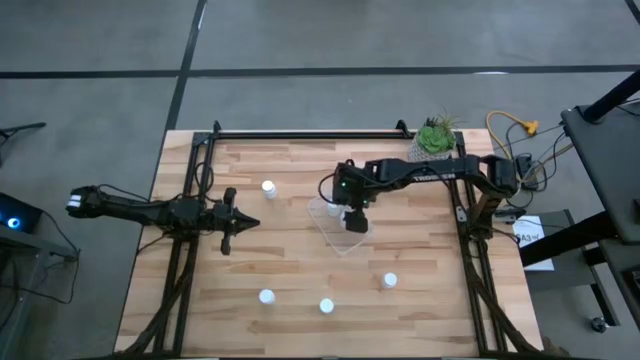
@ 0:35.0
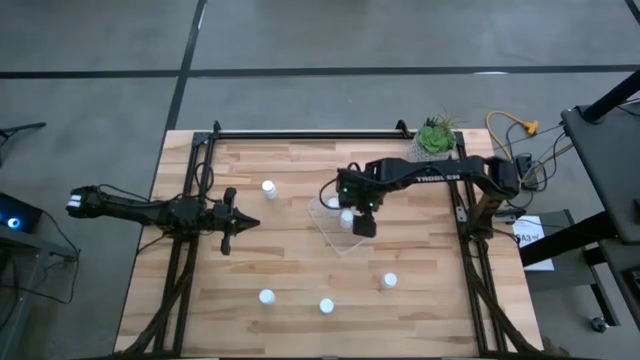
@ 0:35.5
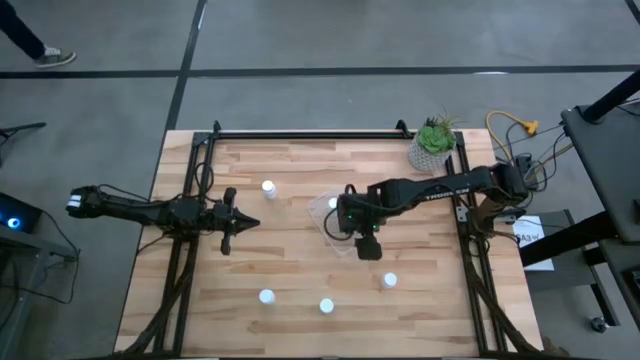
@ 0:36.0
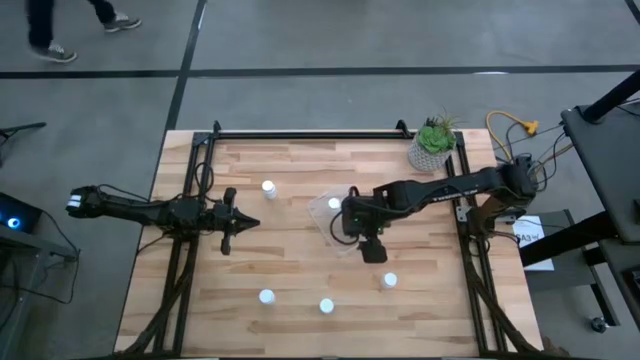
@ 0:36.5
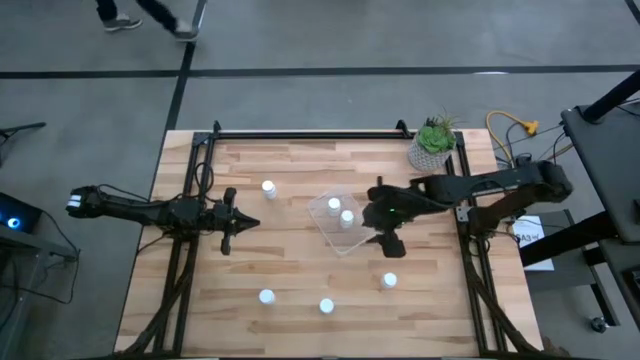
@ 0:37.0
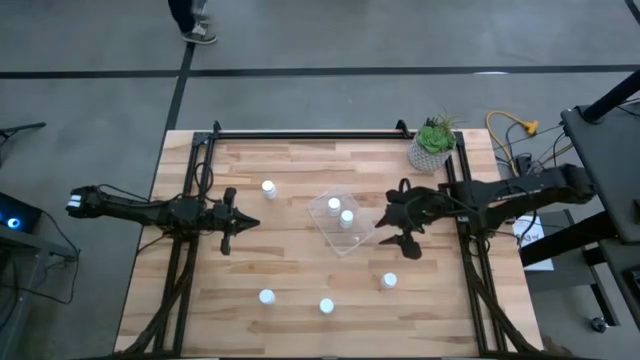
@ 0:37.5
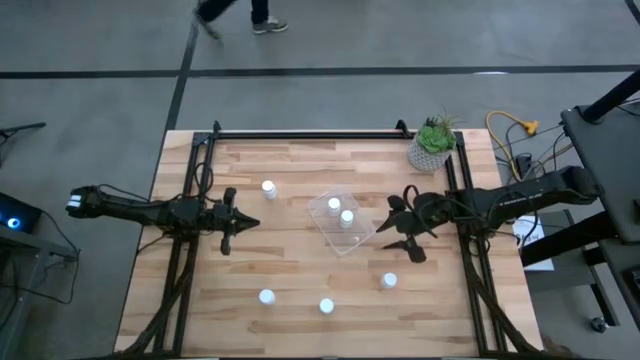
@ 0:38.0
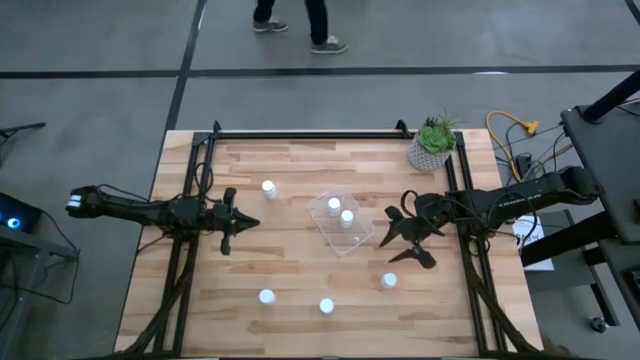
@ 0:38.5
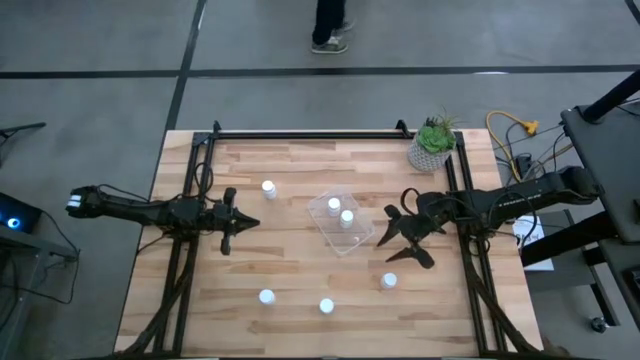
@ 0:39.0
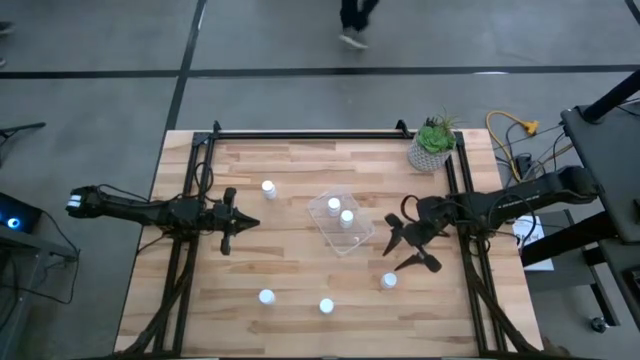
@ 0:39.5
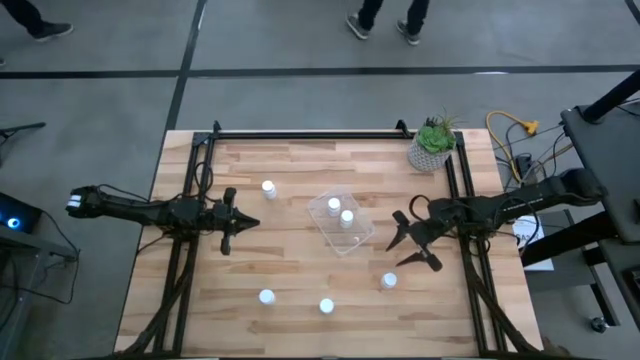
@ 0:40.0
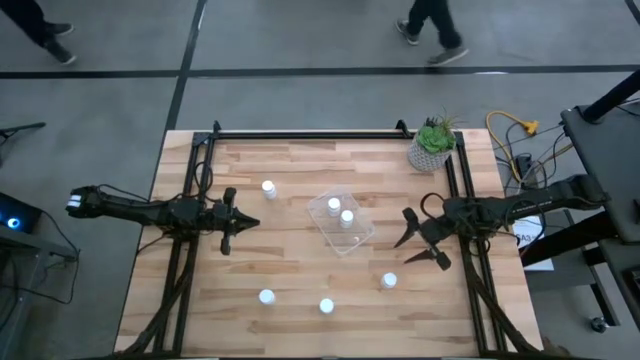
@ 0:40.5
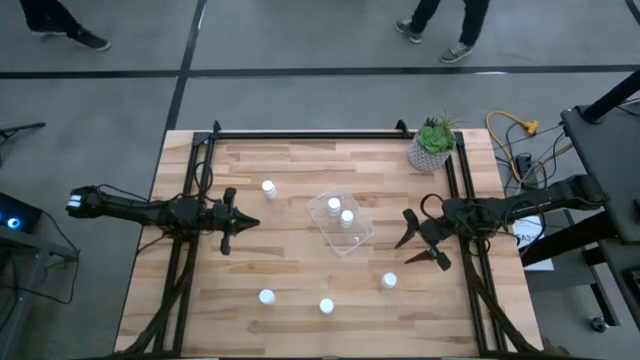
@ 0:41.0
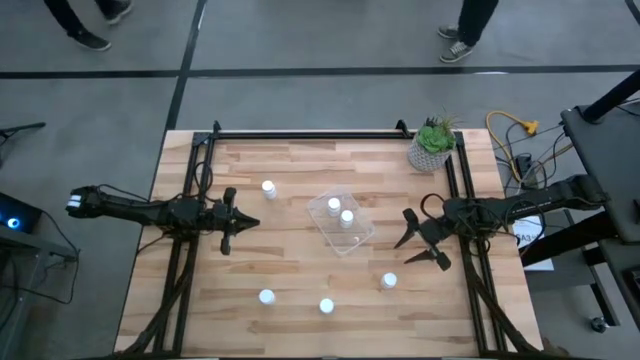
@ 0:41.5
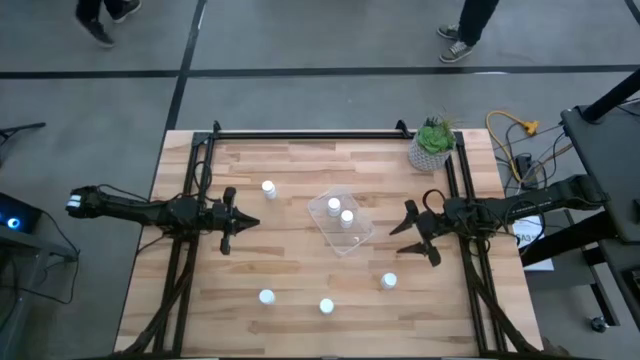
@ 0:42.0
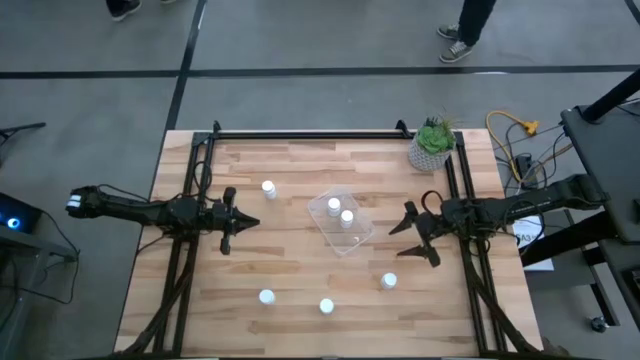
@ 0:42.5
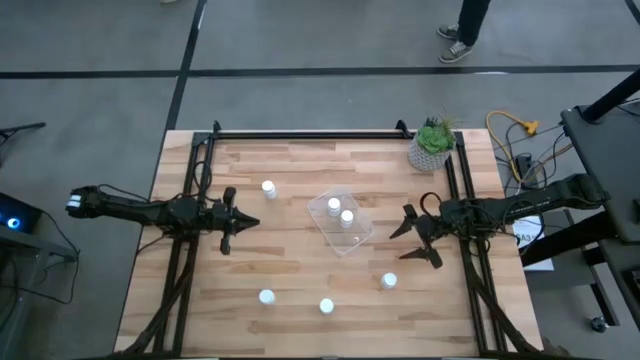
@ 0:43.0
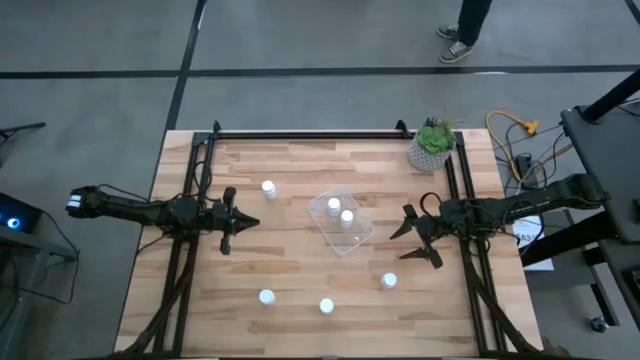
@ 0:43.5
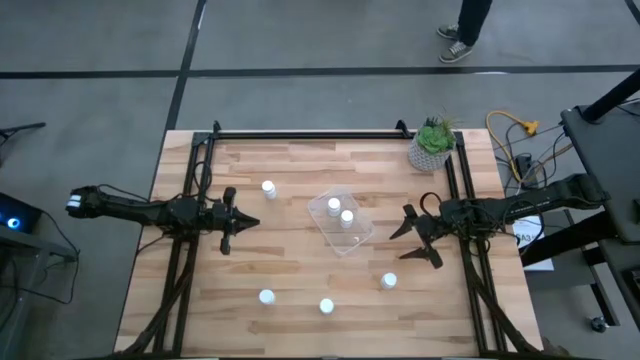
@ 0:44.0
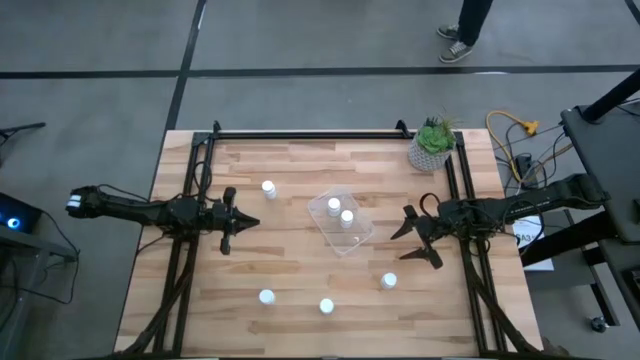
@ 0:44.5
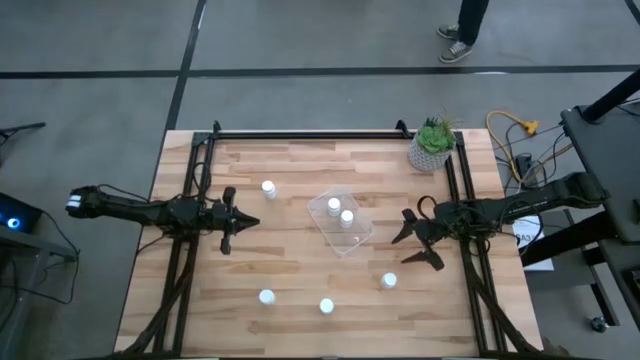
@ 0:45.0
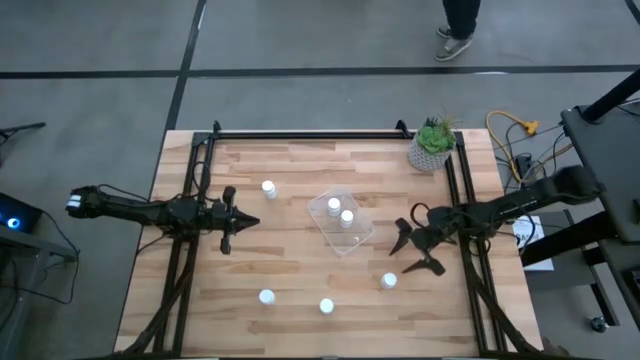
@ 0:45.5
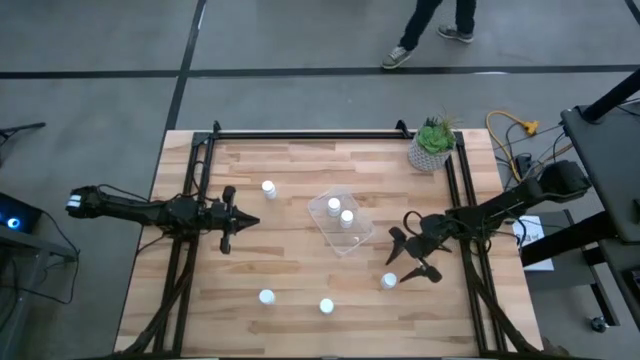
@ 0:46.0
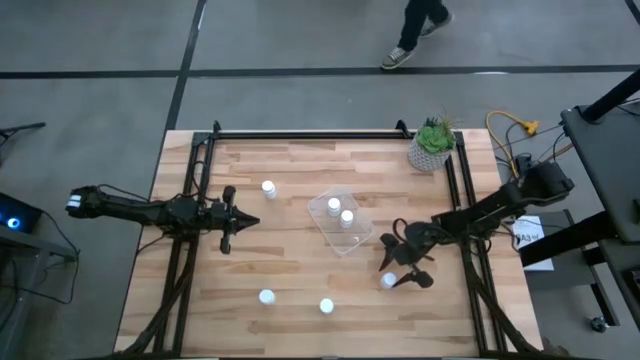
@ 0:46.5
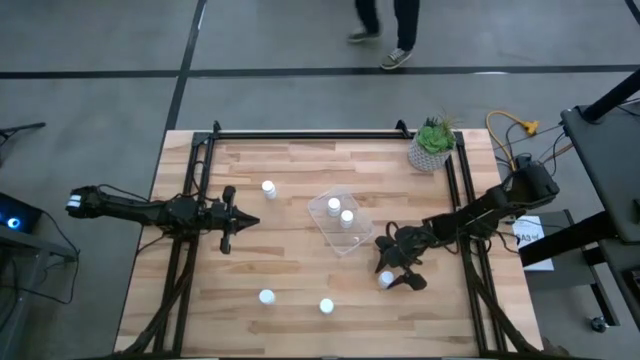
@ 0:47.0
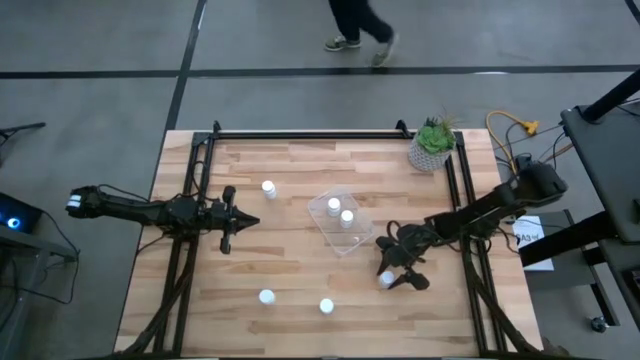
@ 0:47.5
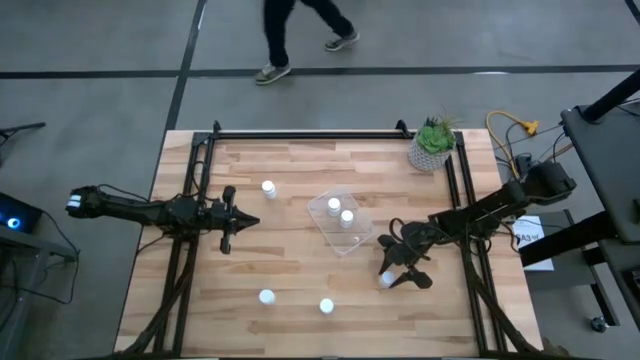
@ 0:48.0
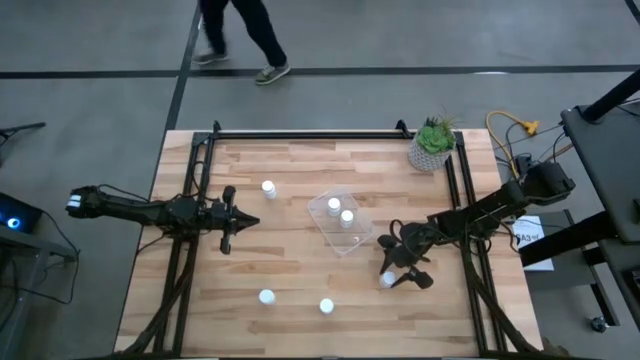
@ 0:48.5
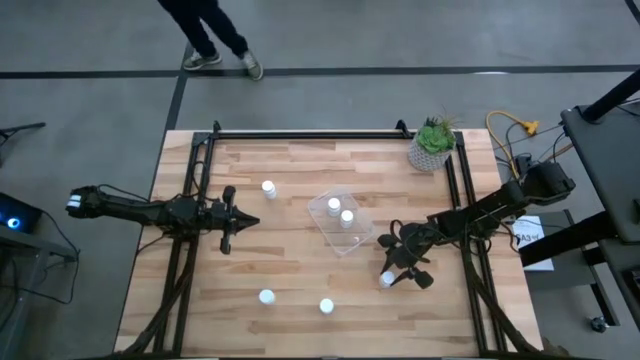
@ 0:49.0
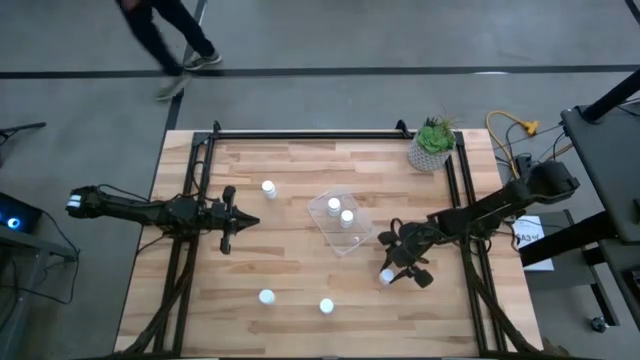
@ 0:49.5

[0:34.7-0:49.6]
Task: Pick and place pill bottles into a basket
Put the white pill bottle into the transparent bin

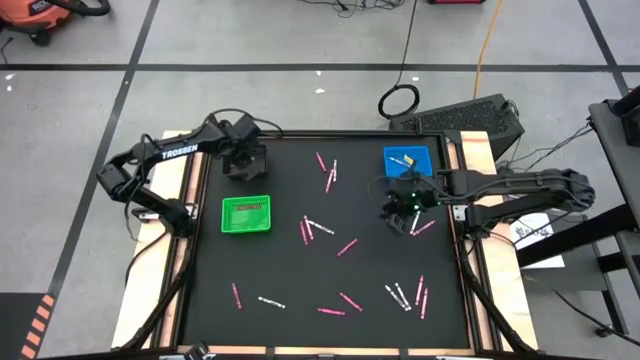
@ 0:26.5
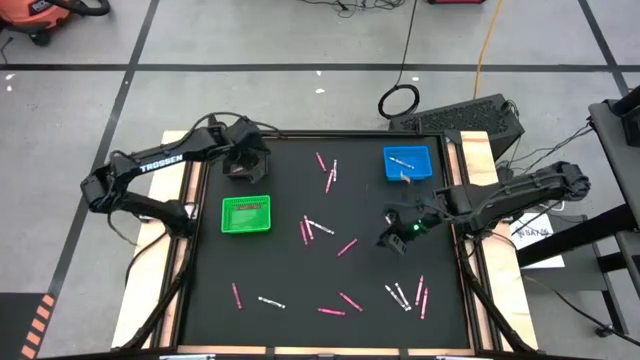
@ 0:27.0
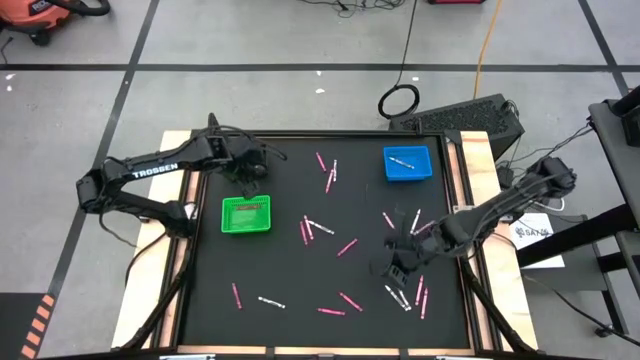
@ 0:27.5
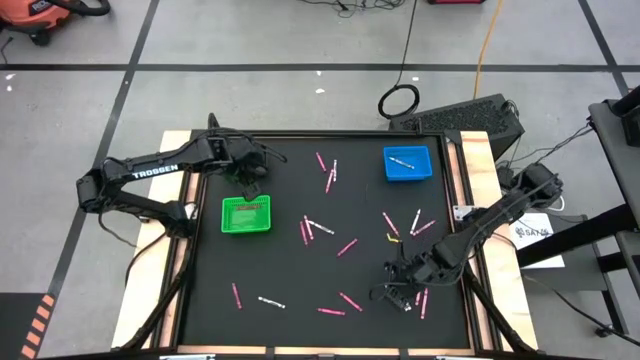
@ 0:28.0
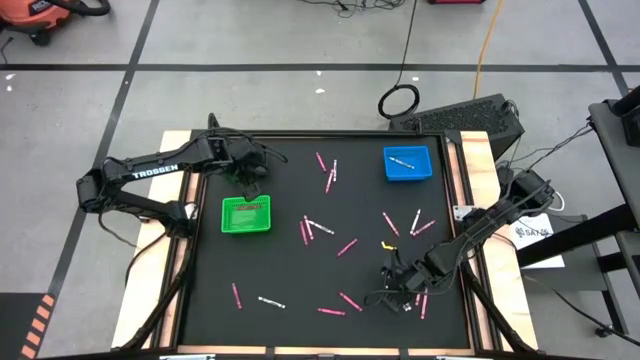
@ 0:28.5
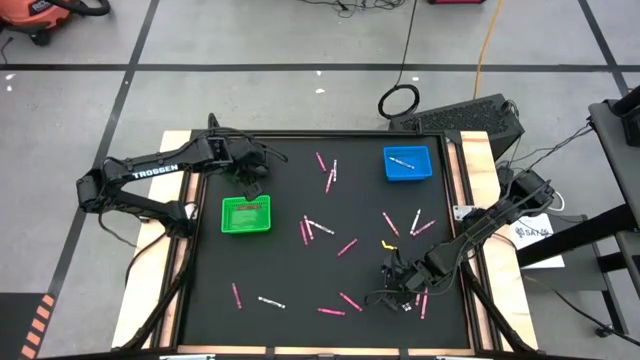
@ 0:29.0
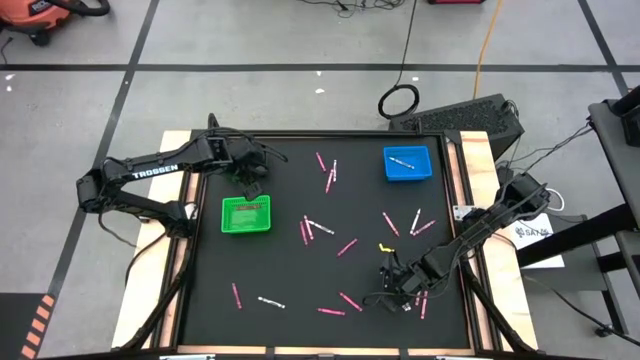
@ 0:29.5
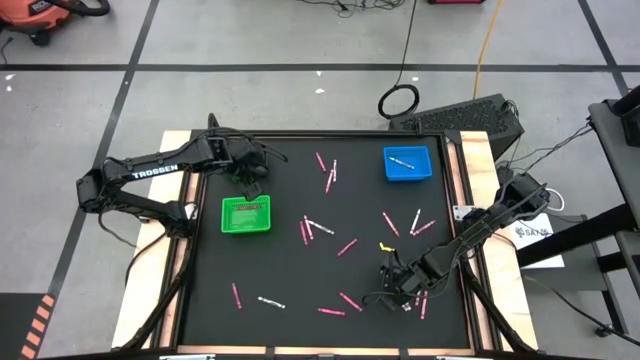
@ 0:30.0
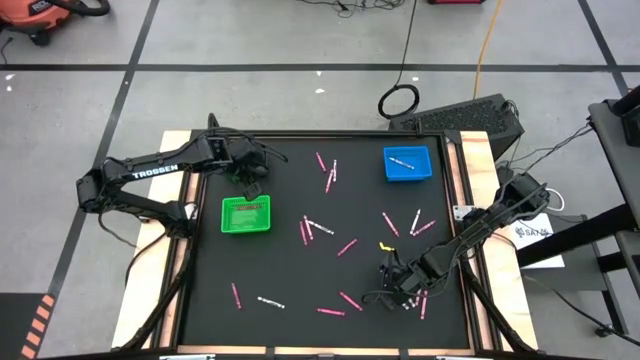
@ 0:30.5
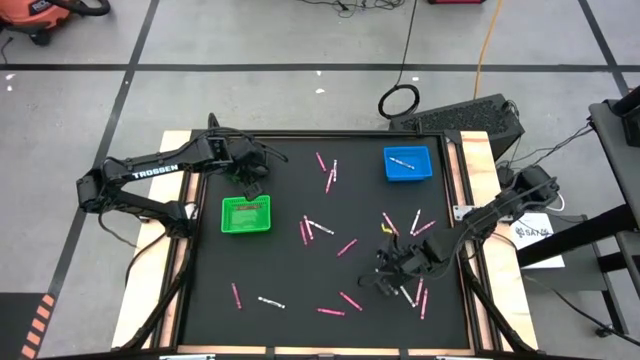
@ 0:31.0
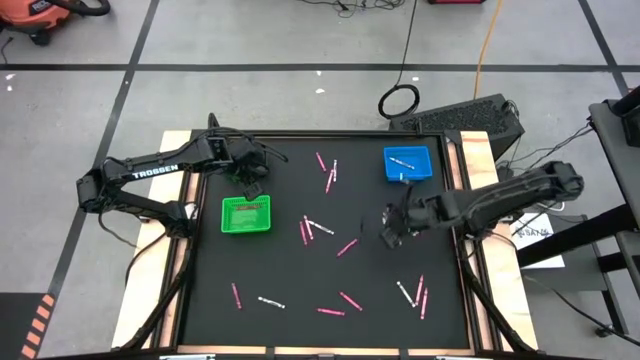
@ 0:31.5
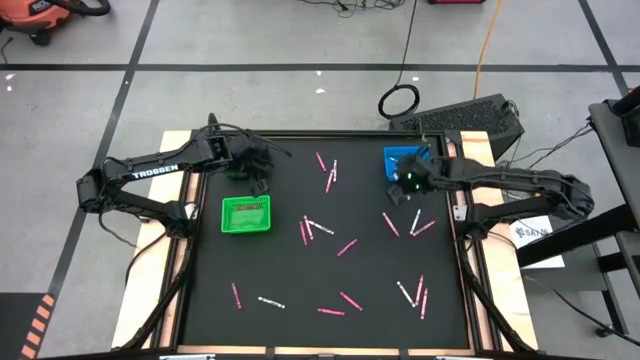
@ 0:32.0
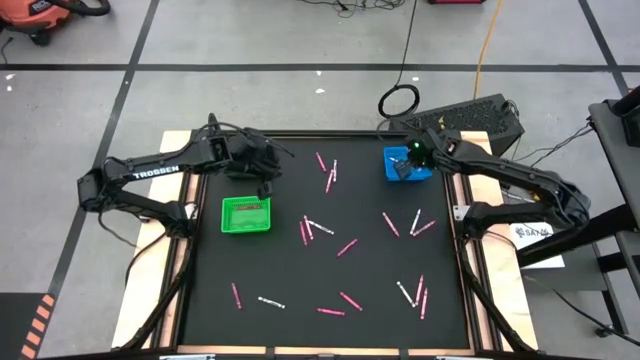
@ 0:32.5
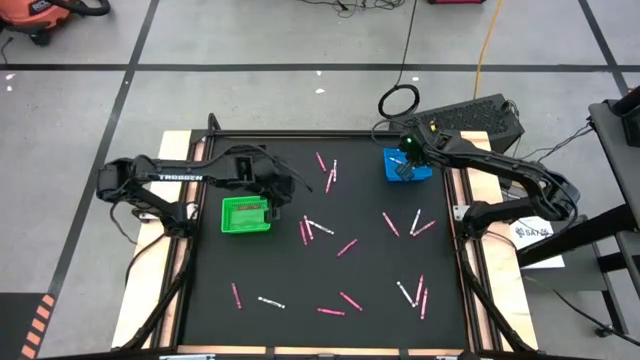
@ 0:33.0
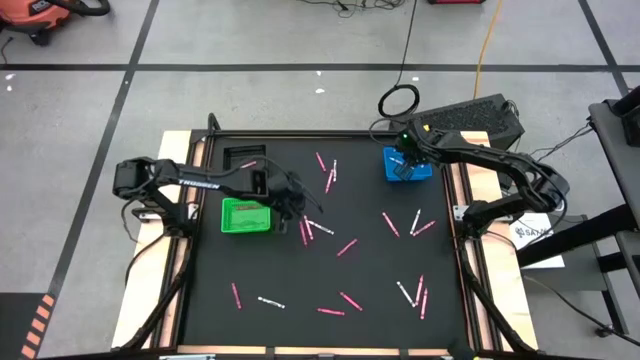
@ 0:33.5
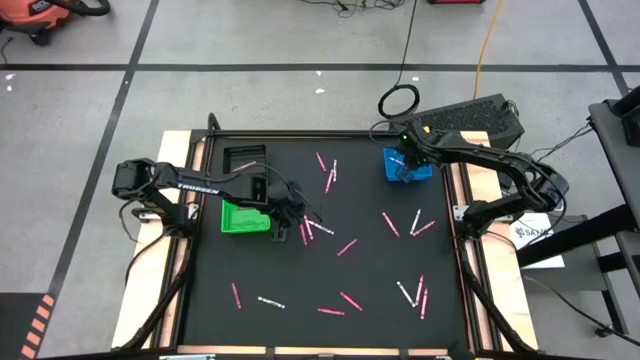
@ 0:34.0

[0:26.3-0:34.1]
Task: Sort crayons
Put the white crayon into the blue bin
